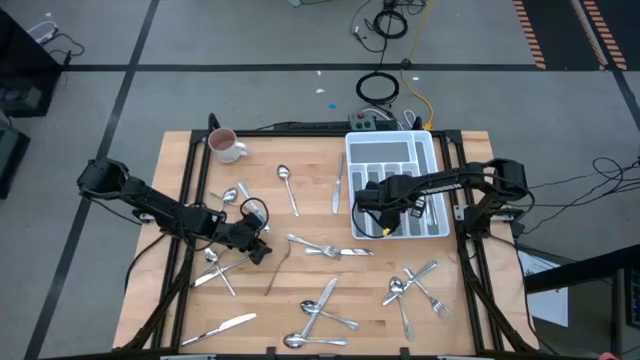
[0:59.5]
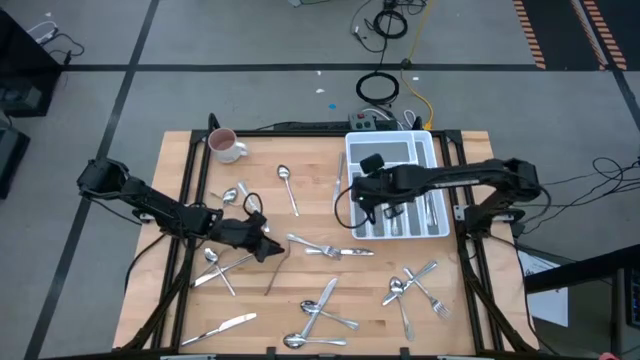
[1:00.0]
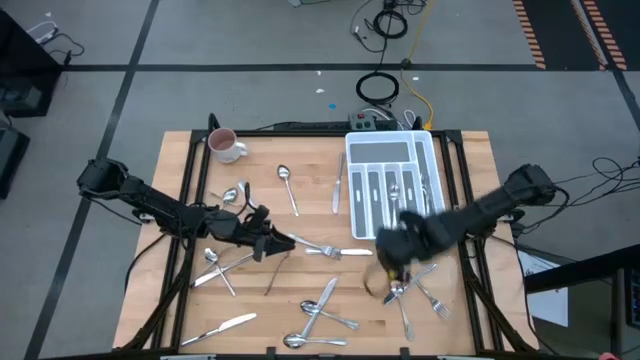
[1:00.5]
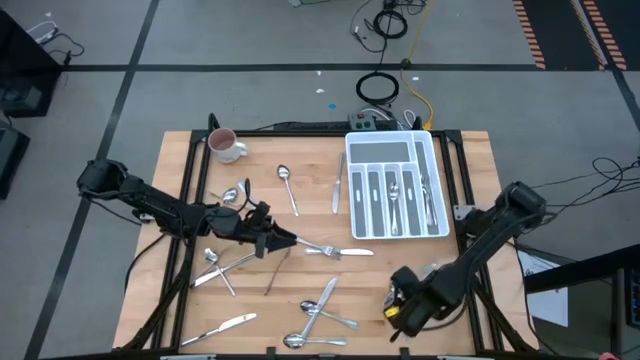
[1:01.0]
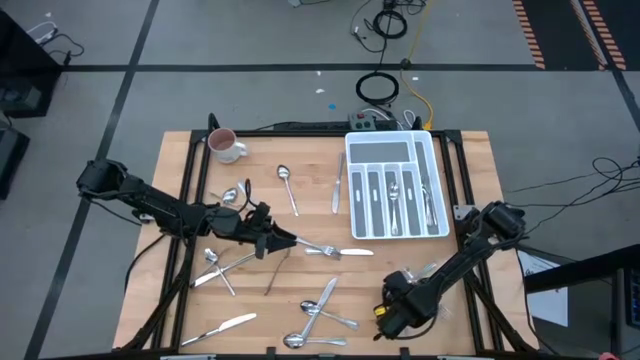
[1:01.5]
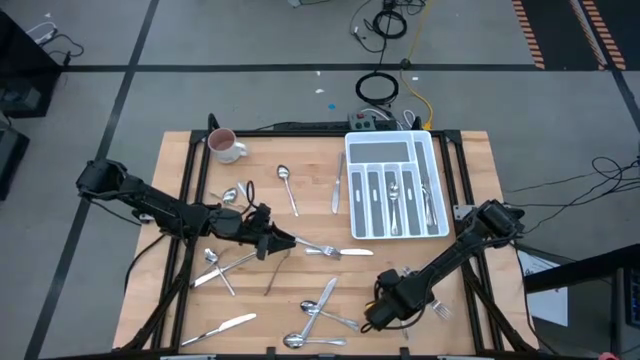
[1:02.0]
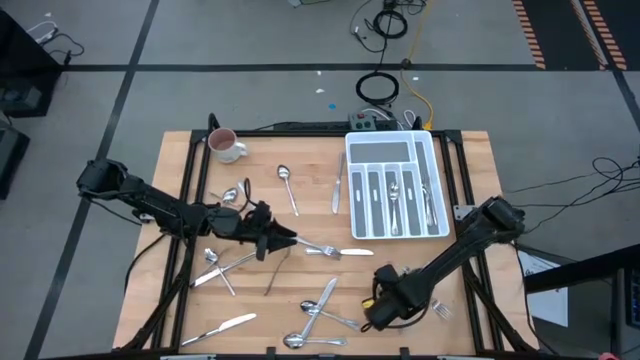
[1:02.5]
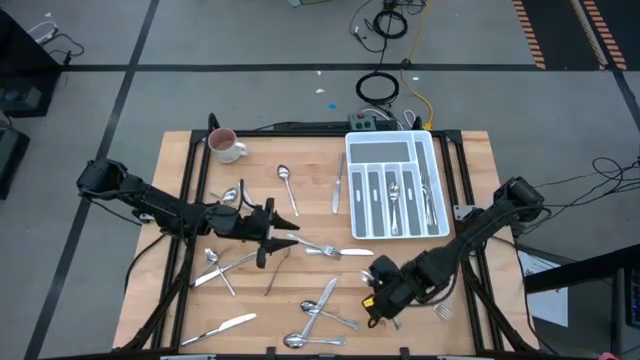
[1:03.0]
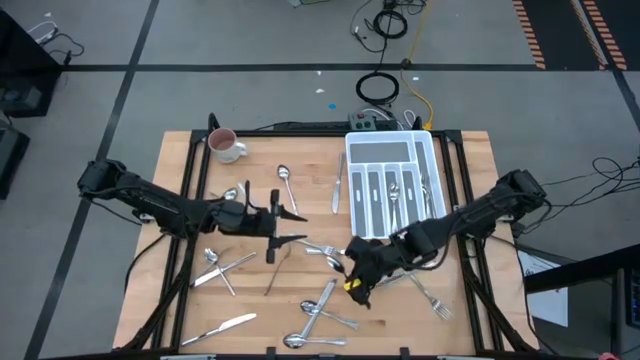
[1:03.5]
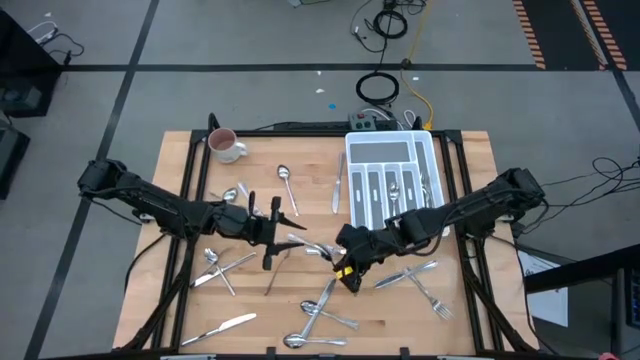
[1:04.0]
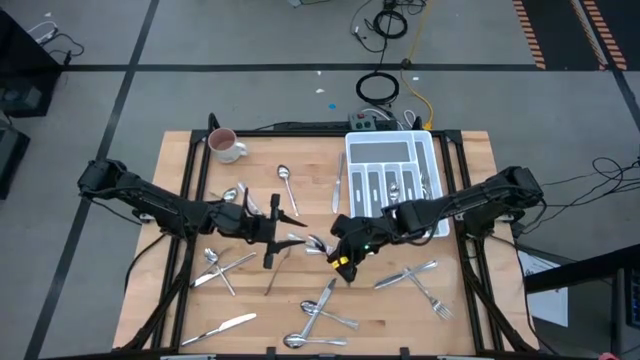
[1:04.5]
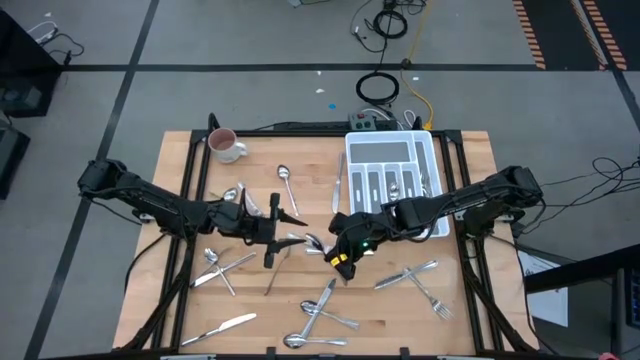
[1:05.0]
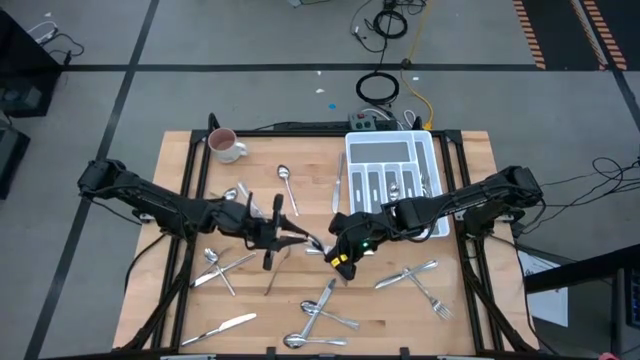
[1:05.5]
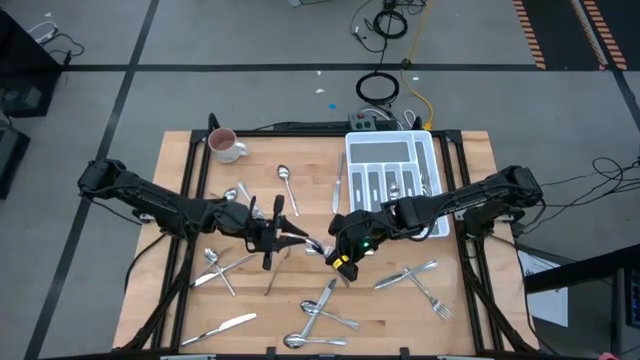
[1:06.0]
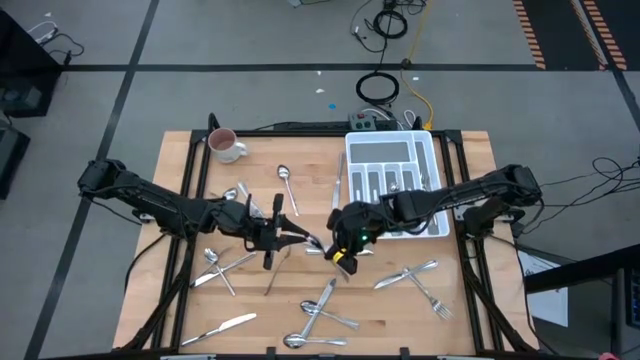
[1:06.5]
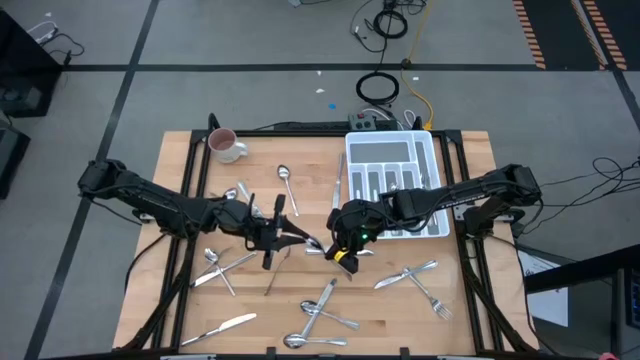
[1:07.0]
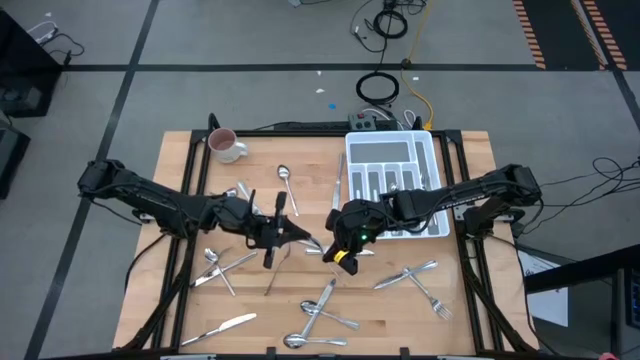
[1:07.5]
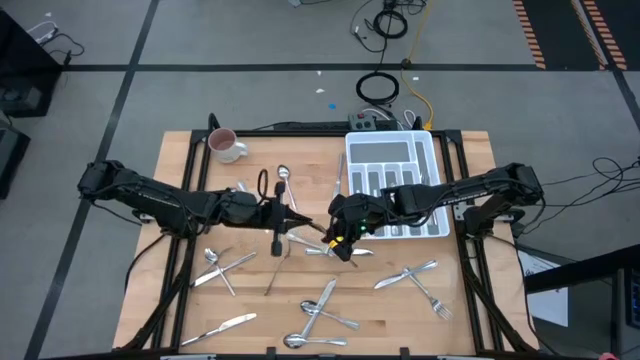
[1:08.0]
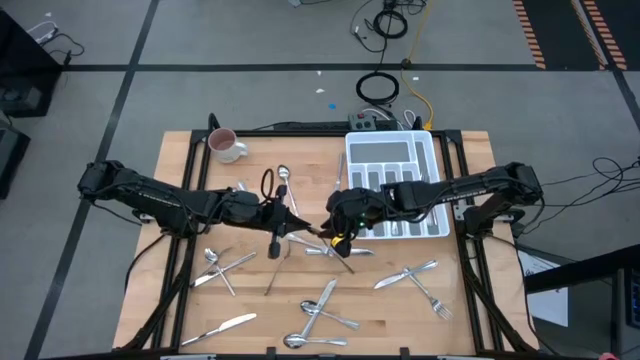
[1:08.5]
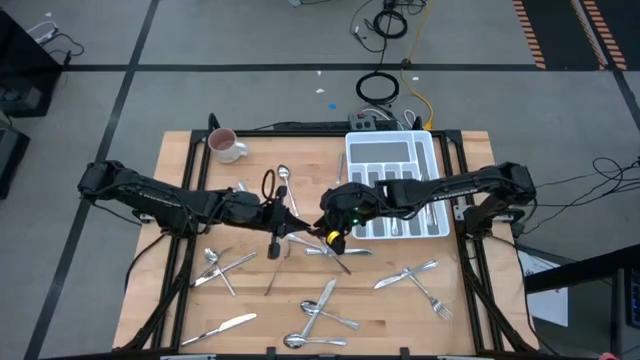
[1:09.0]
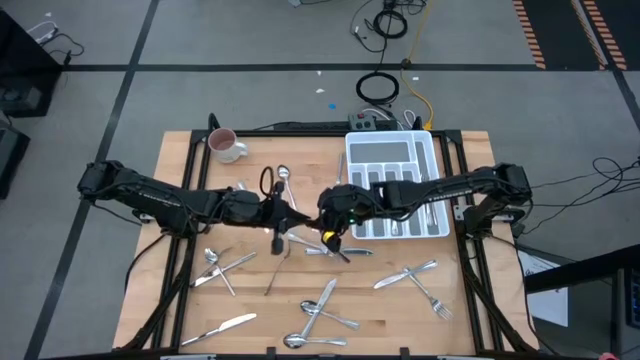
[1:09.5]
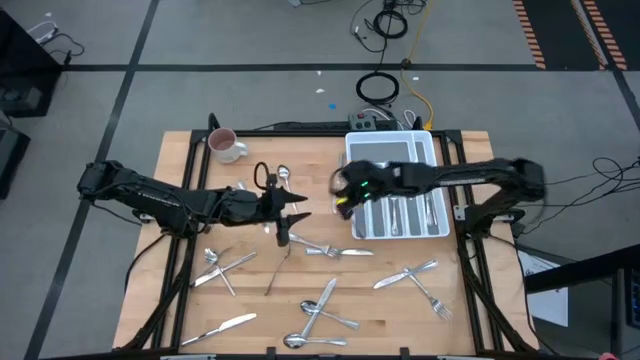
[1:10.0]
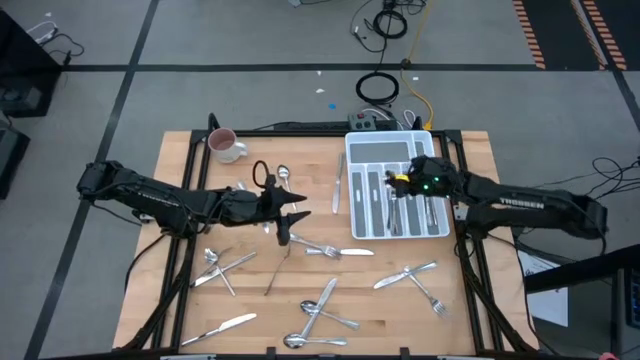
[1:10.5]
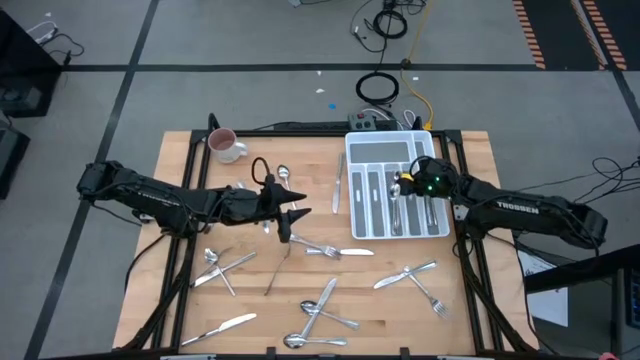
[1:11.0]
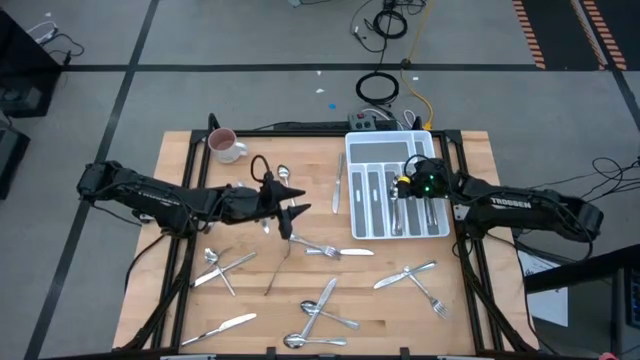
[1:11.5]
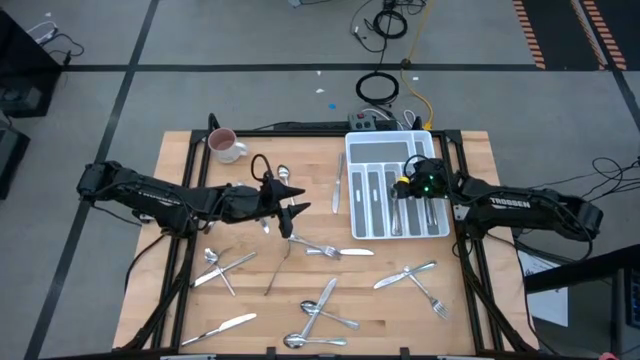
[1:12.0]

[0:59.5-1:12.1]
Task: Sort silverware
Put the spoon in the middle section of the silverware tray

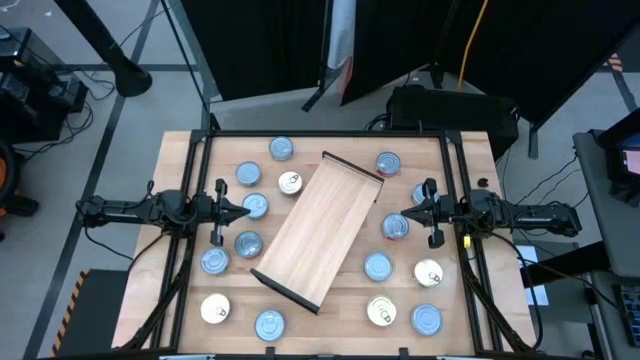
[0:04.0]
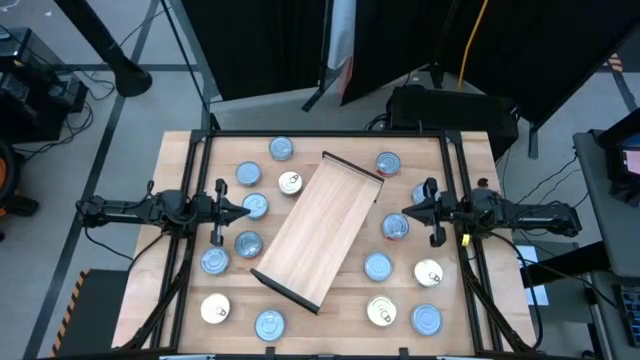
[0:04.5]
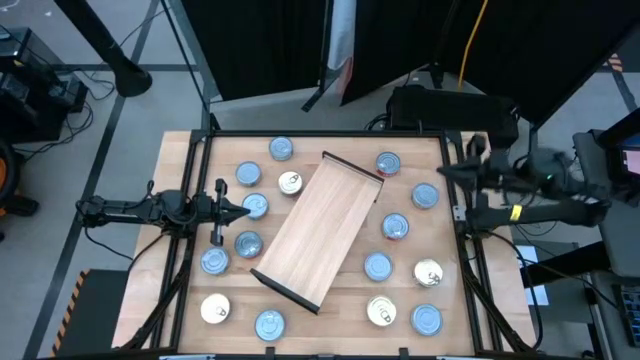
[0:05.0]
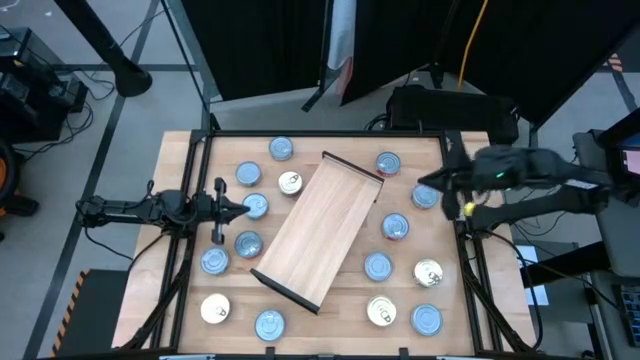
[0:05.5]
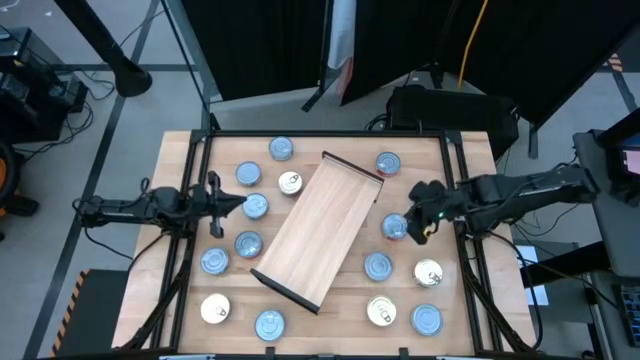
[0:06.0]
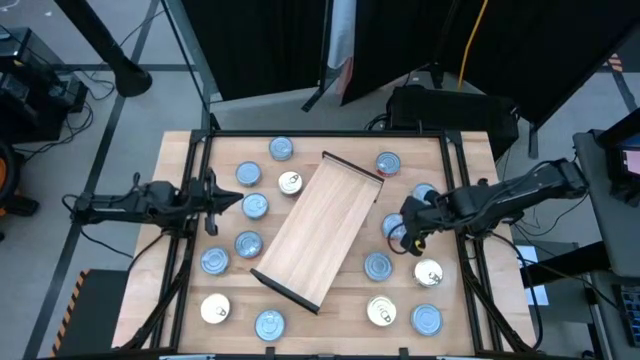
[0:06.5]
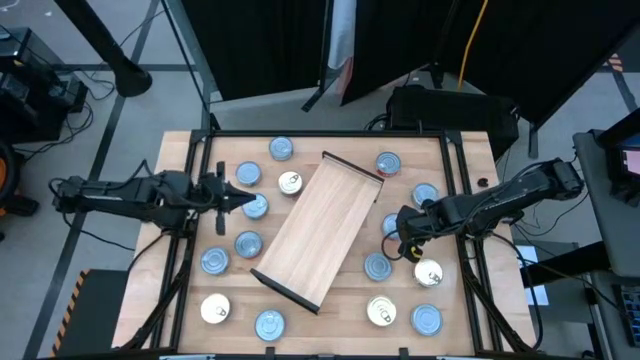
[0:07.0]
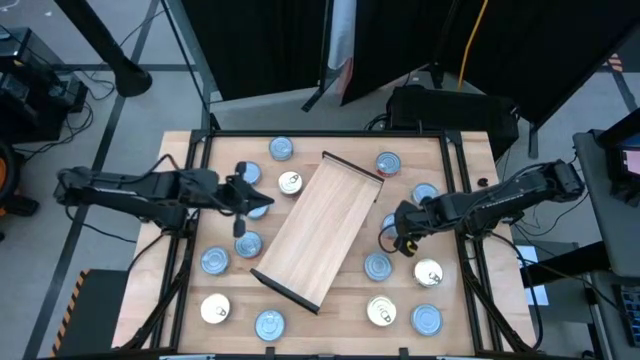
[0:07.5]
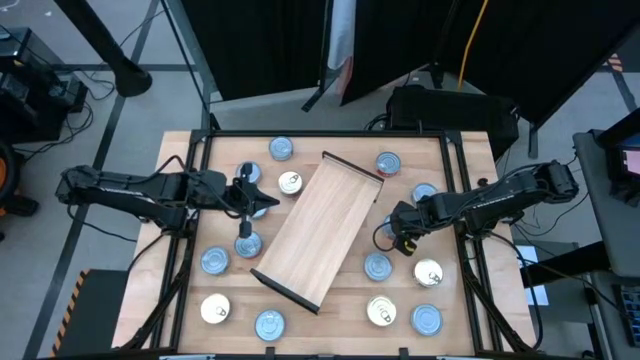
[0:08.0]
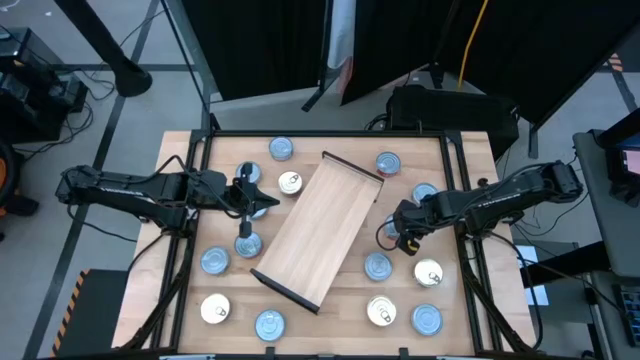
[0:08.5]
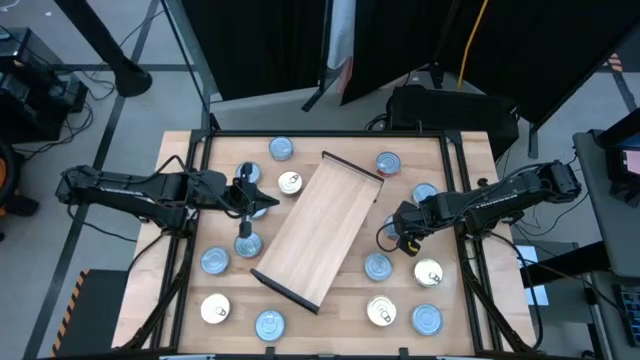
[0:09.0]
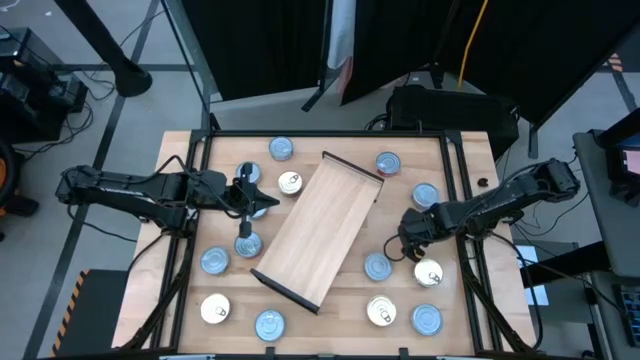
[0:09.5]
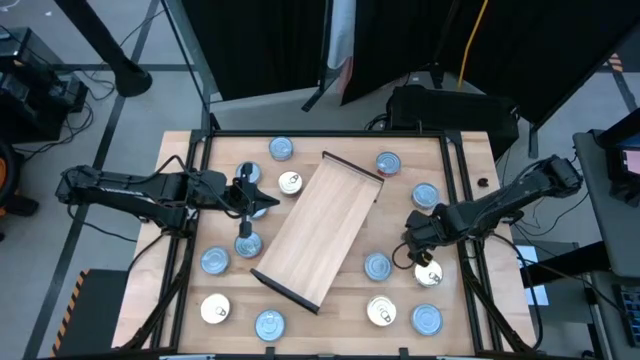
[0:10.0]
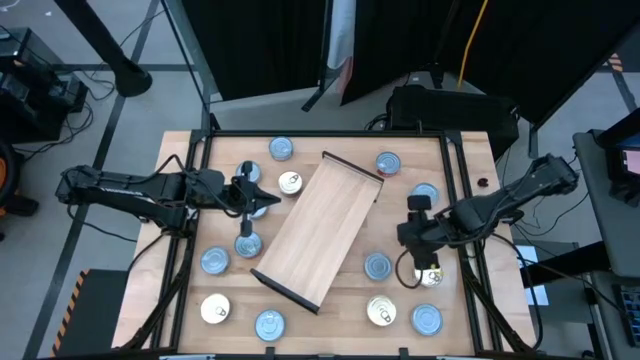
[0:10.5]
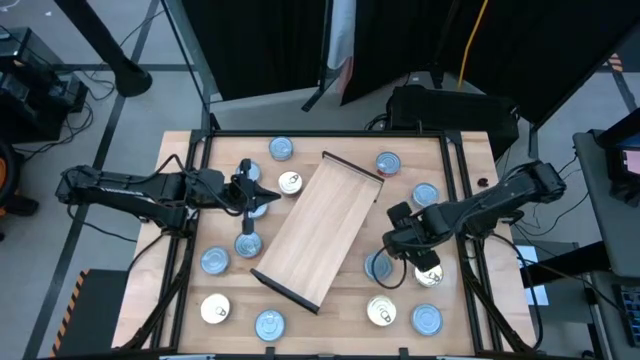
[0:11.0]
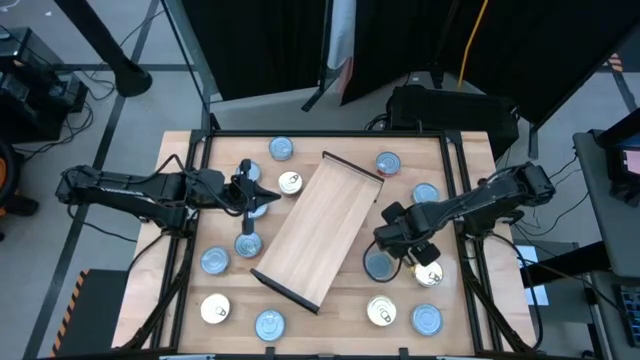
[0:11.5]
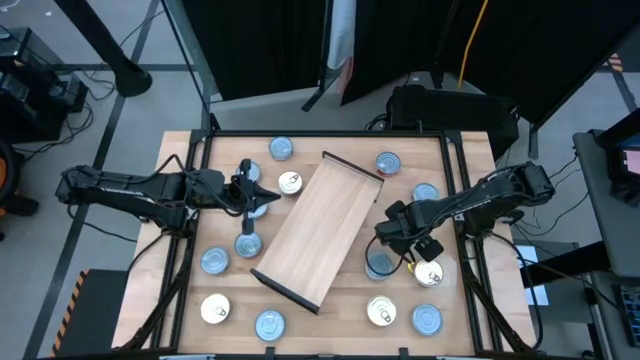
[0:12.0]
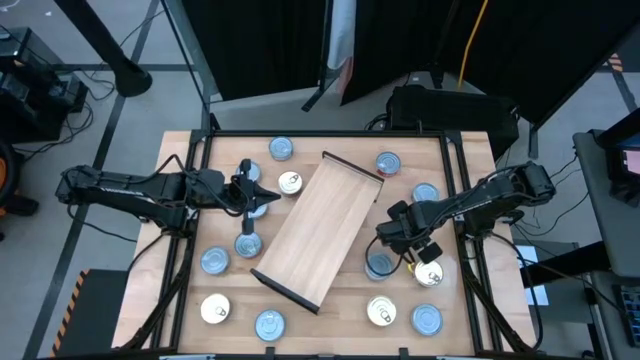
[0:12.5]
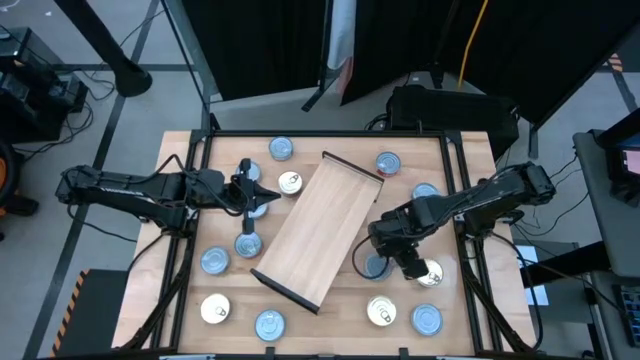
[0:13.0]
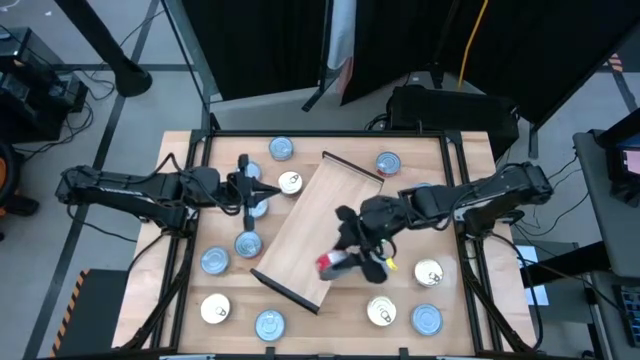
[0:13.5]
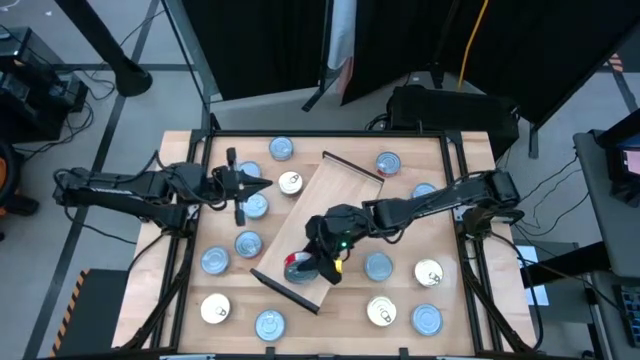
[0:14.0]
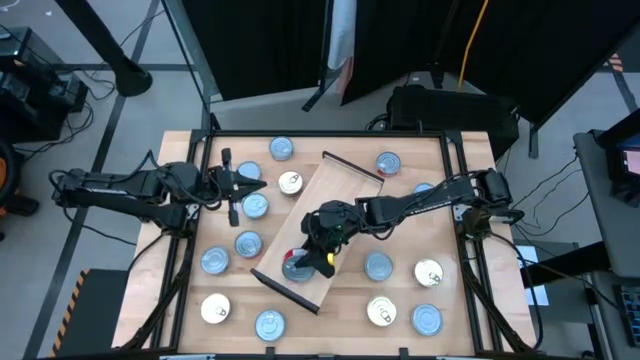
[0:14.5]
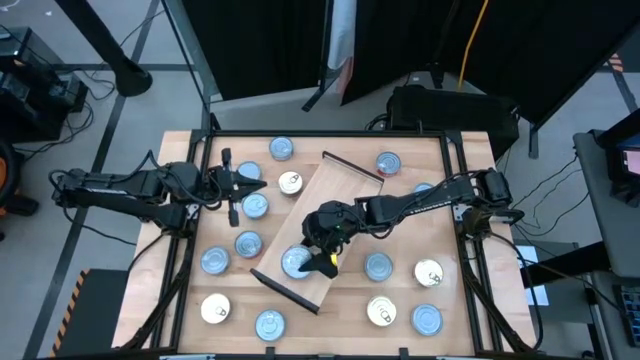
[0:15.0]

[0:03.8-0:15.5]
Task: Stack canned seafood by type on shelf
Put the red tuna can on the shelf
